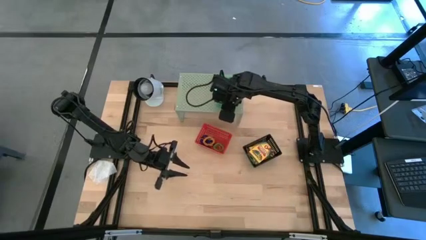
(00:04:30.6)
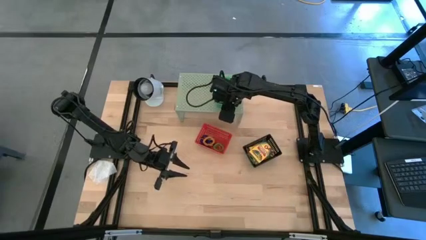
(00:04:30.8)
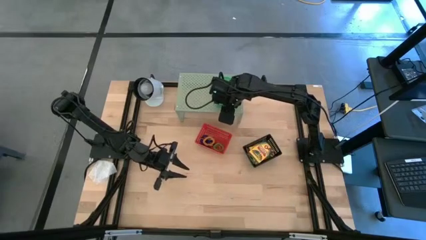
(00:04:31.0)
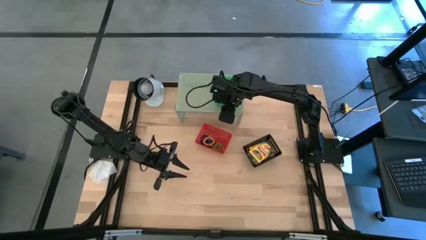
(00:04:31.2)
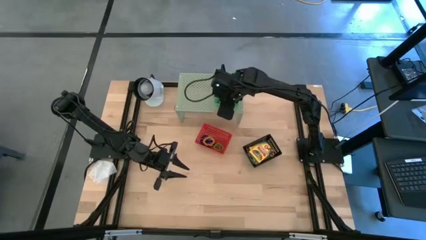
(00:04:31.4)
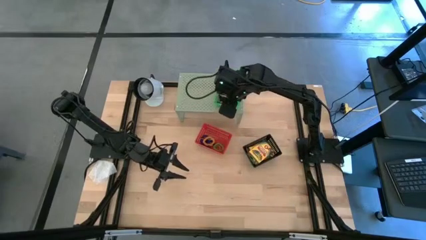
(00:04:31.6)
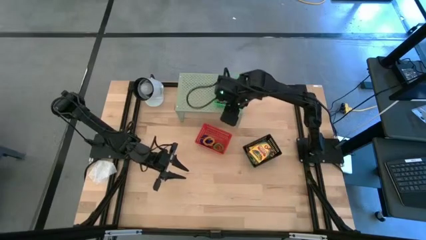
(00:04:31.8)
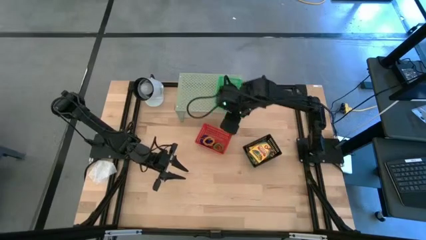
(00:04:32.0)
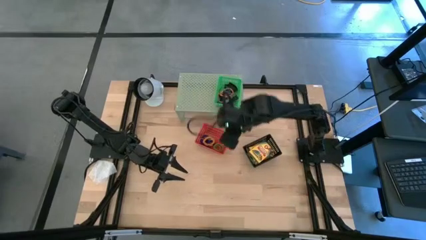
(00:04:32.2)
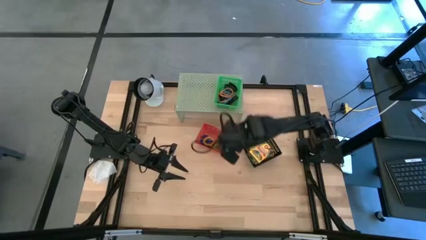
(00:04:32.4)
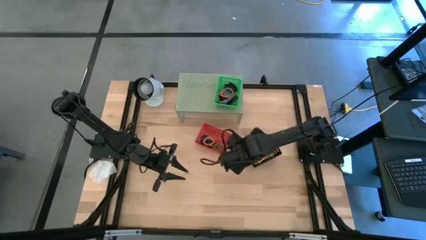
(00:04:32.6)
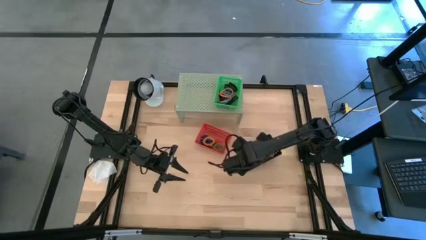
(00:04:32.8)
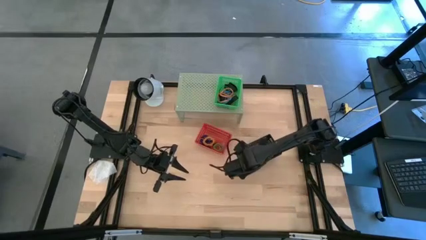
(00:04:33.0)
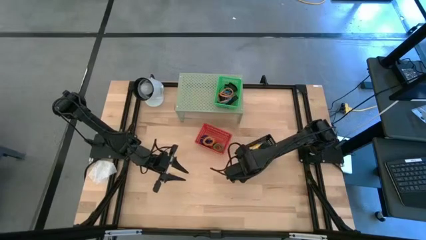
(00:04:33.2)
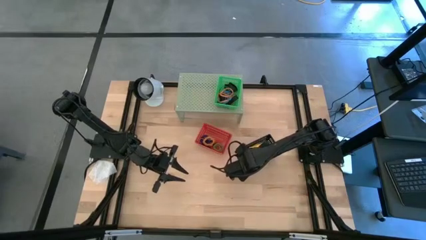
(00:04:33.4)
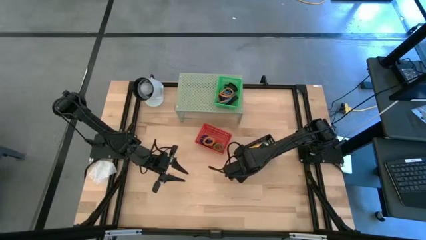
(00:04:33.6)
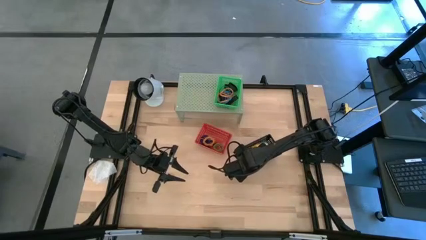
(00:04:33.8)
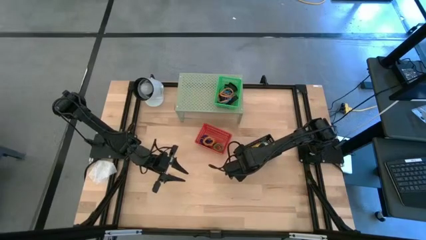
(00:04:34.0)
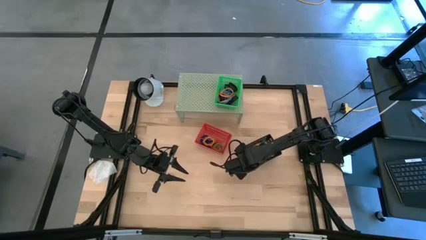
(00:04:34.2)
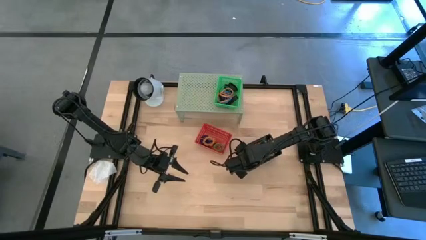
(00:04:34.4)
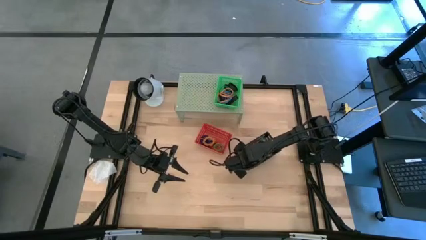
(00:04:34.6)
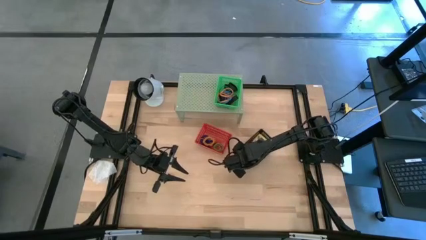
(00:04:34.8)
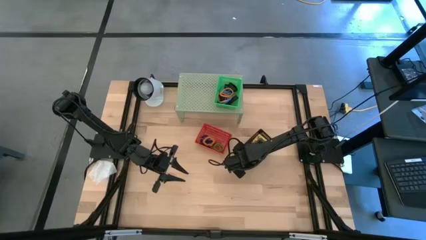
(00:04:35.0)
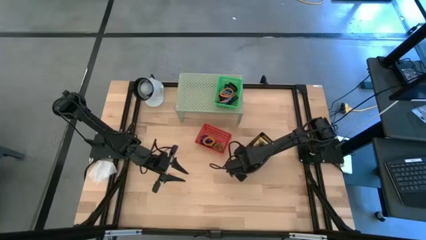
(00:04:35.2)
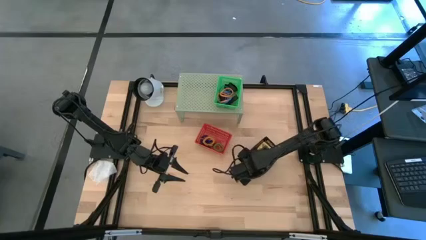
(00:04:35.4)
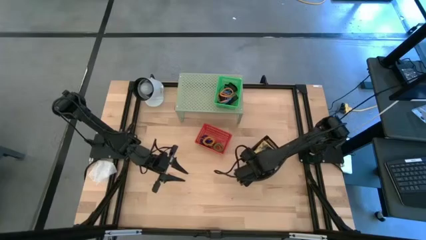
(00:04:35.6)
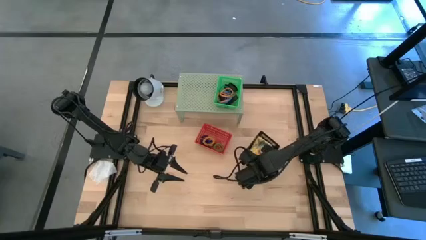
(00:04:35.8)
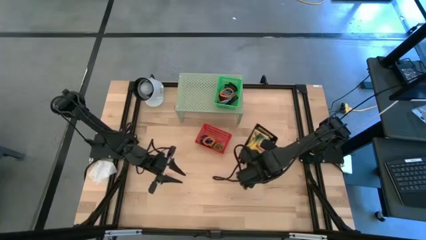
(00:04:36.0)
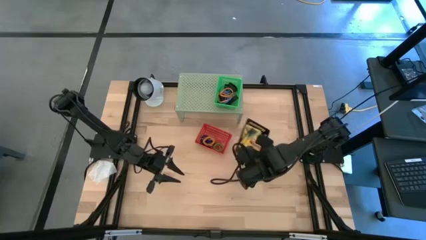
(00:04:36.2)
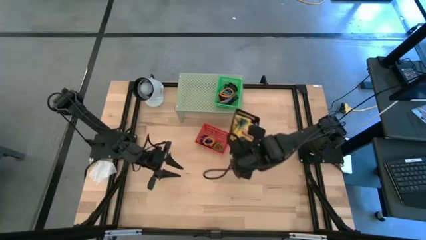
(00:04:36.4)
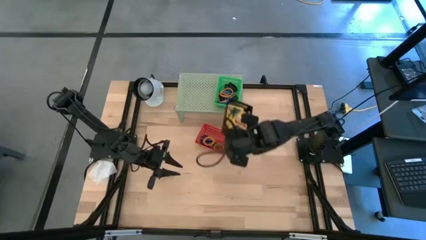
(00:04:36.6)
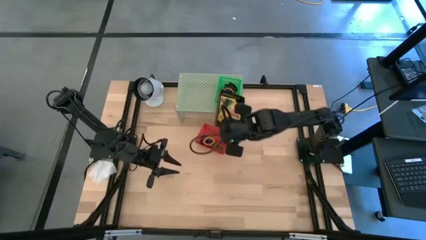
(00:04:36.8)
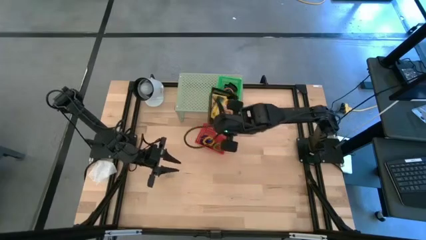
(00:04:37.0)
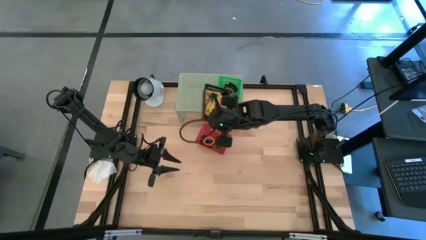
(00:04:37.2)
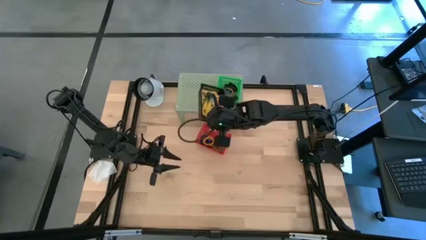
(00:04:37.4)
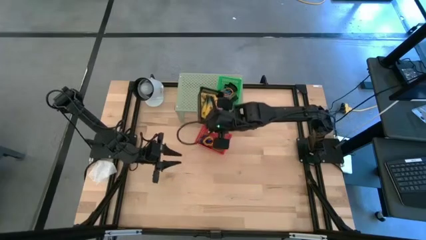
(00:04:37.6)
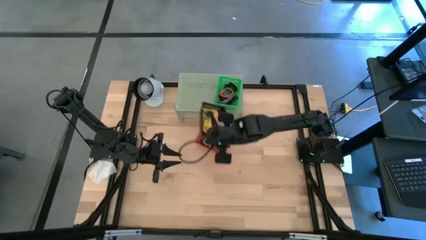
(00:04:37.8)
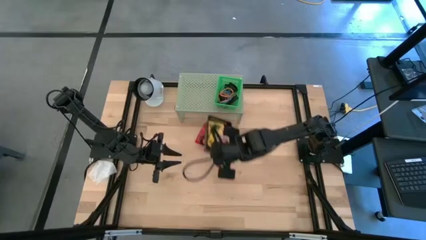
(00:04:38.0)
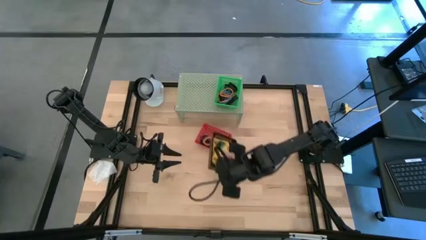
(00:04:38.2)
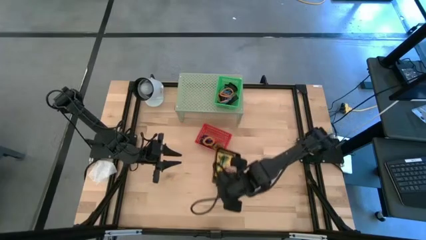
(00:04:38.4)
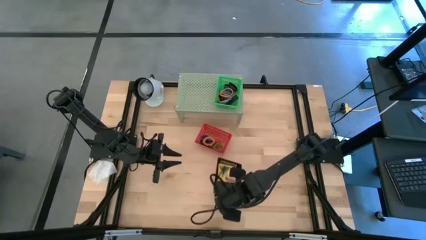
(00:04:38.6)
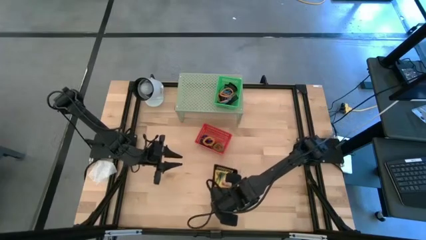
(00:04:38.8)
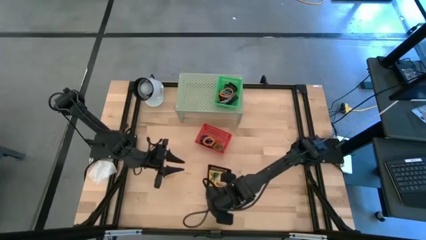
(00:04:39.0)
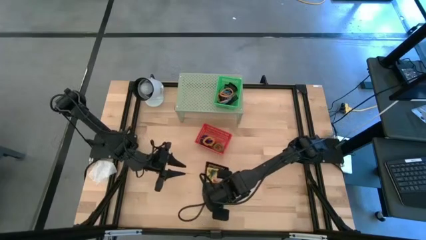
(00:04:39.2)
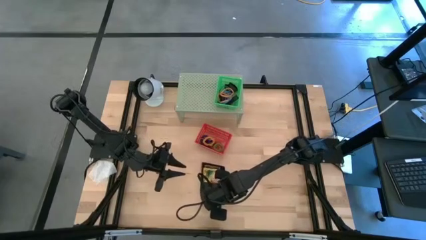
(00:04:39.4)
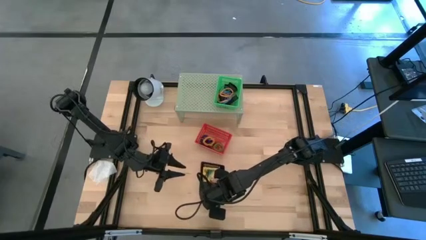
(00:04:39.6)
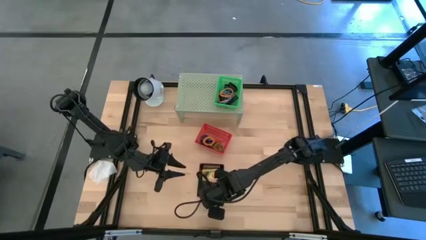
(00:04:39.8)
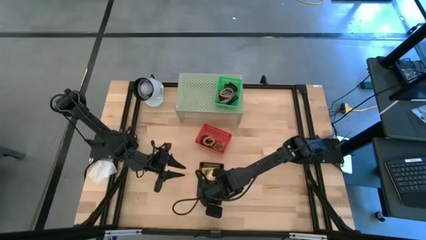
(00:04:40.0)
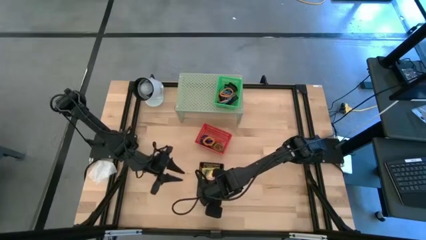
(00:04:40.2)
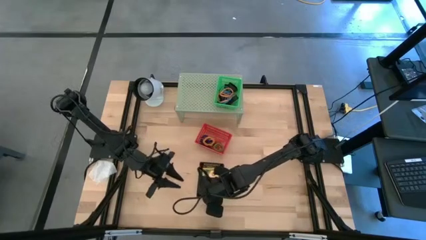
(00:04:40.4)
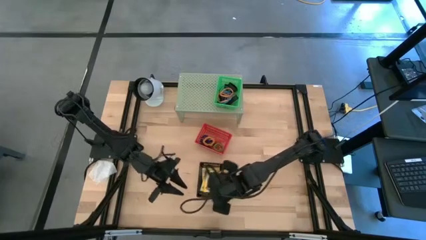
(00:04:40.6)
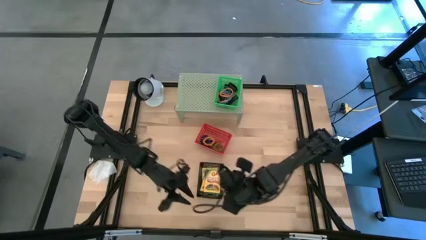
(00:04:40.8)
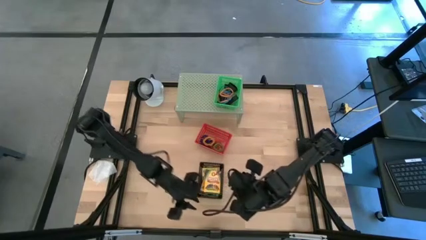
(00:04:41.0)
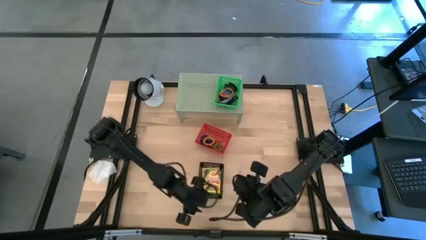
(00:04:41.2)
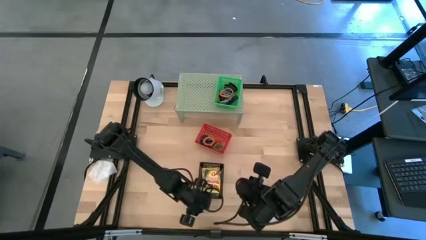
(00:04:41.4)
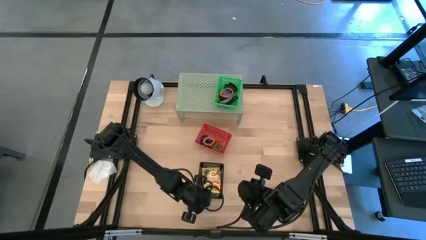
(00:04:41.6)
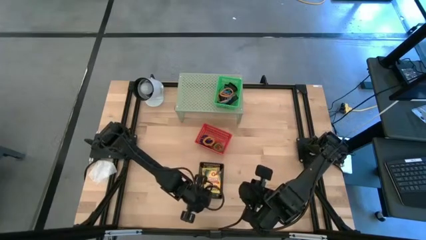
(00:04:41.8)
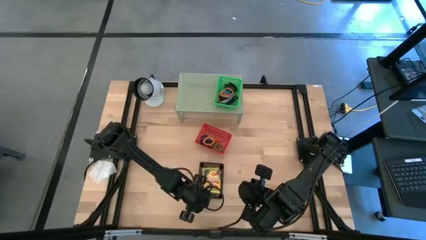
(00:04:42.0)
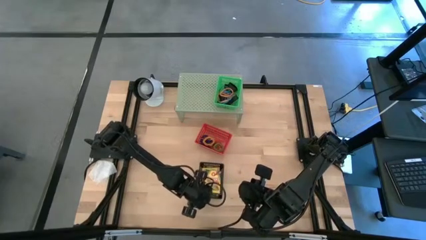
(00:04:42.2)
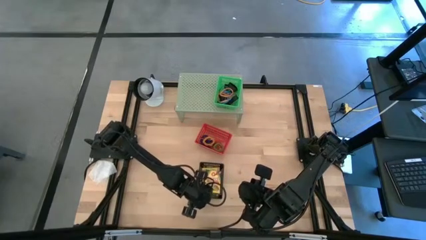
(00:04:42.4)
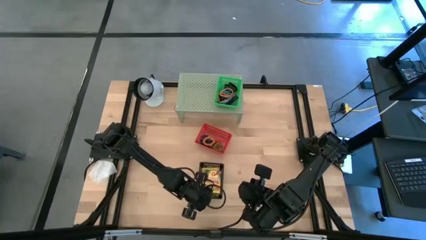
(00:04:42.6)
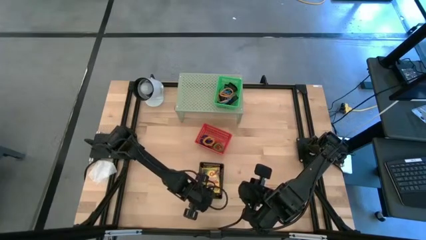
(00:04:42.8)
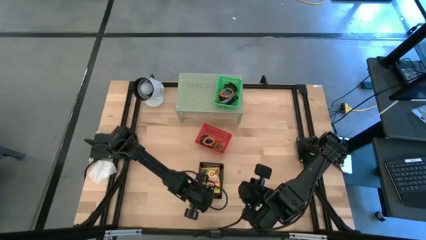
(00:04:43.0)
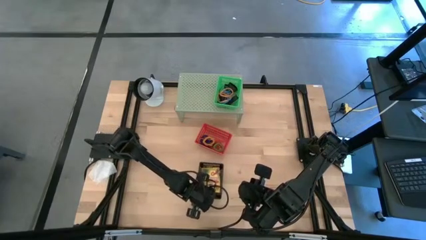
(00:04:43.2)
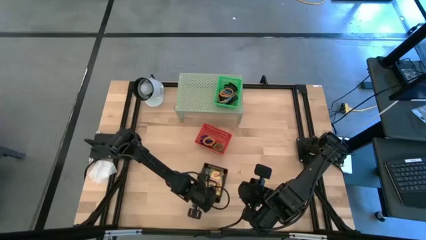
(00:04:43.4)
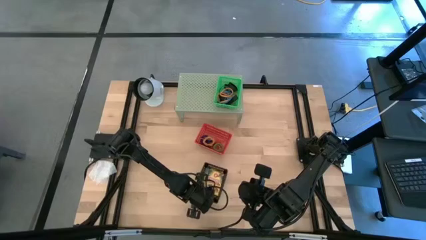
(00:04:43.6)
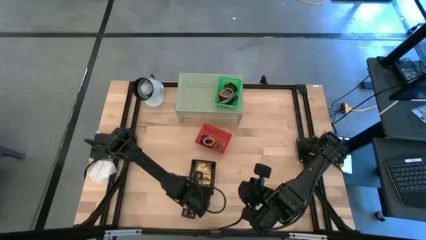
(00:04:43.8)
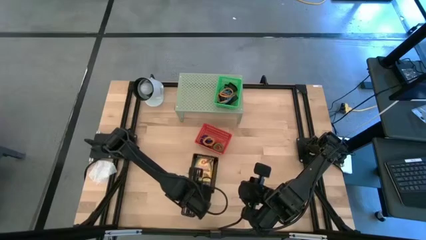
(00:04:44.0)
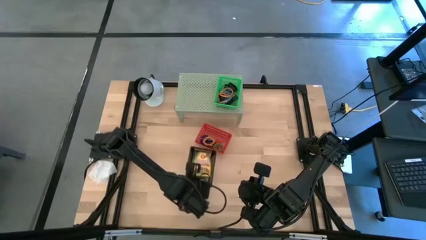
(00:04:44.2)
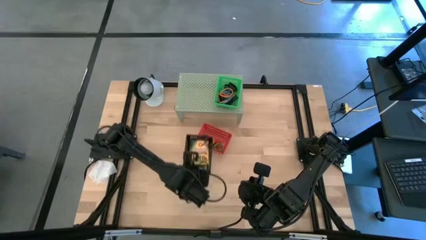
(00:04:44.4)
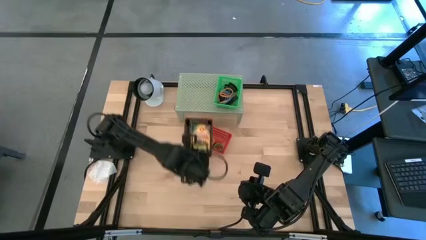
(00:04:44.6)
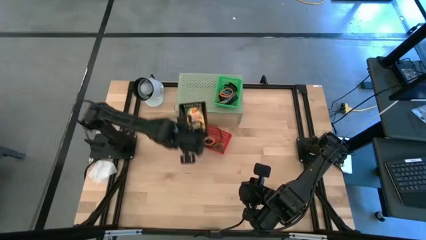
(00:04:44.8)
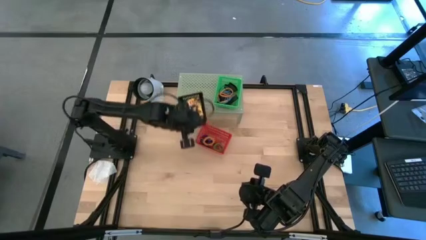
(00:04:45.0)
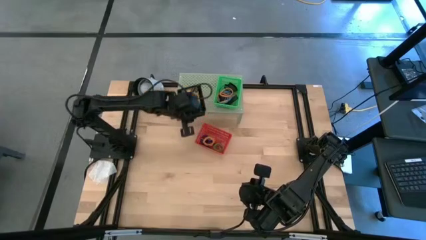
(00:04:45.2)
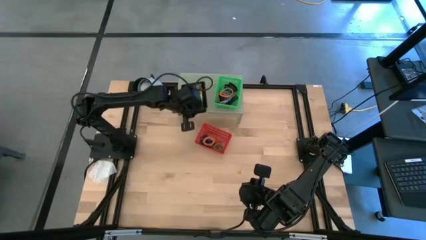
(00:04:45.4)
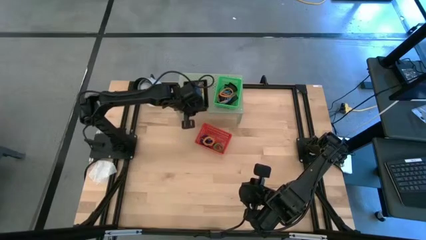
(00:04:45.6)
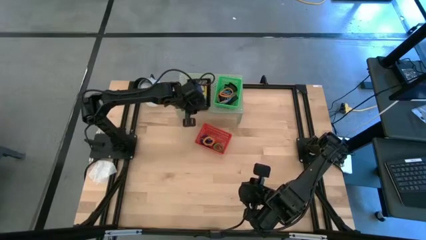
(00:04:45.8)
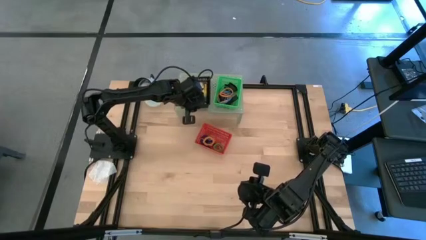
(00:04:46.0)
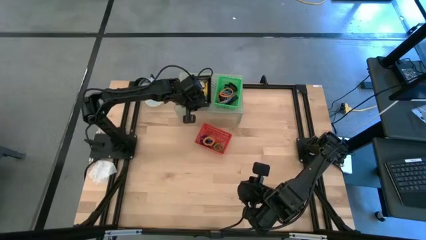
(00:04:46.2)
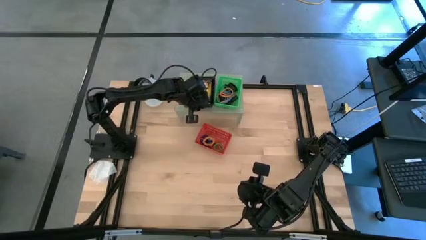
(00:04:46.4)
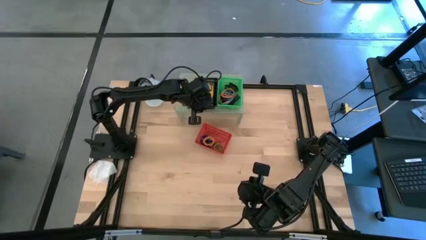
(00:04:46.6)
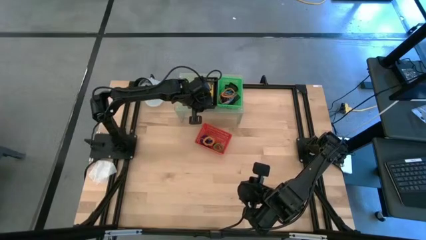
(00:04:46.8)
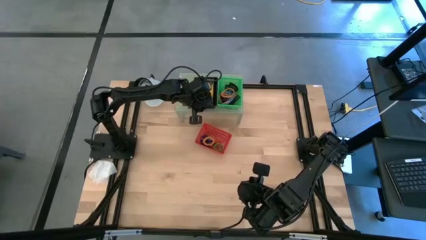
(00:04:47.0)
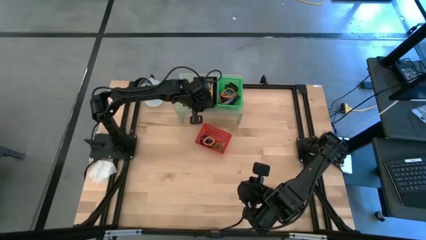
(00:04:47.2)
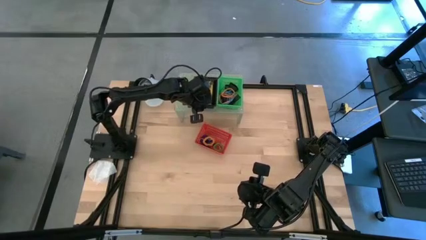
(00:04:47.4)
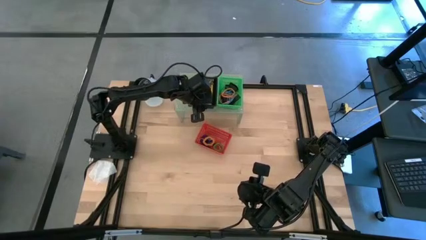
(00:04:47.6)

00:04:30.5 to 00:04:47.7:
Task: Pick & Place Office Desk Supplies
Put the black bin filled with crayon boxes on the shelf
